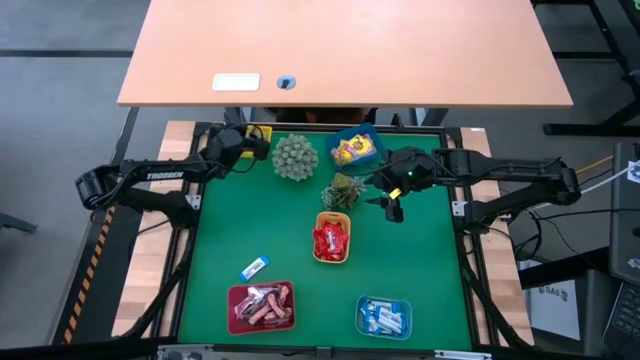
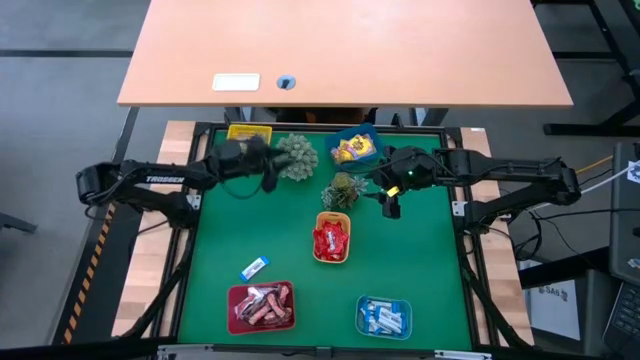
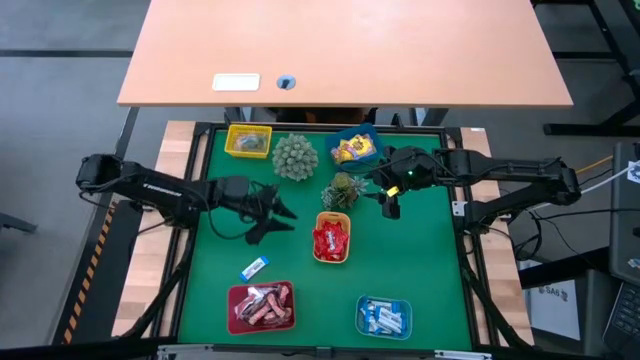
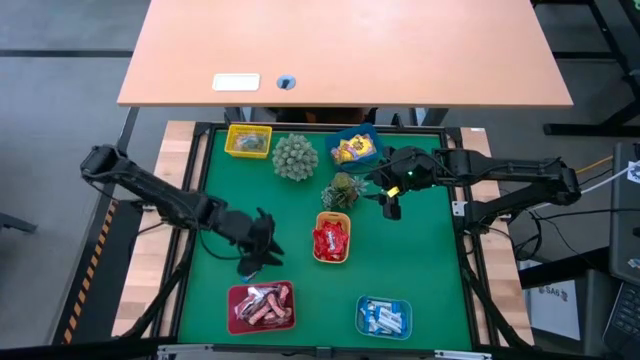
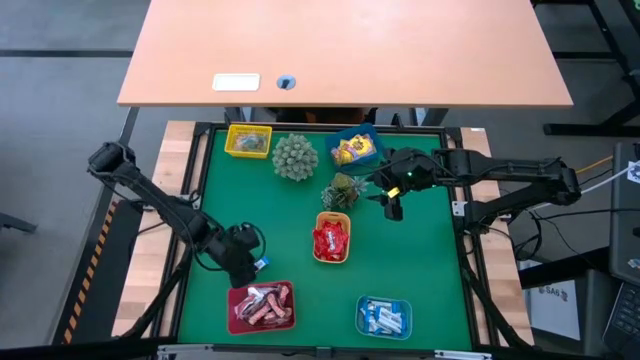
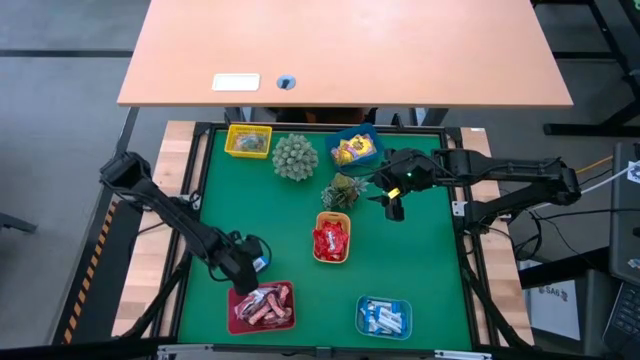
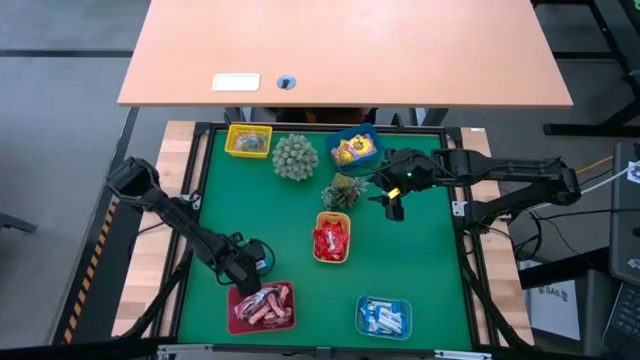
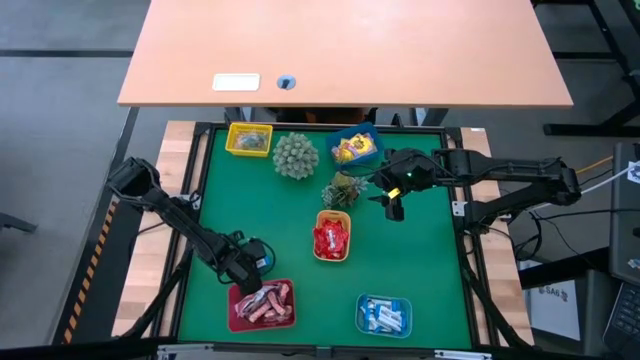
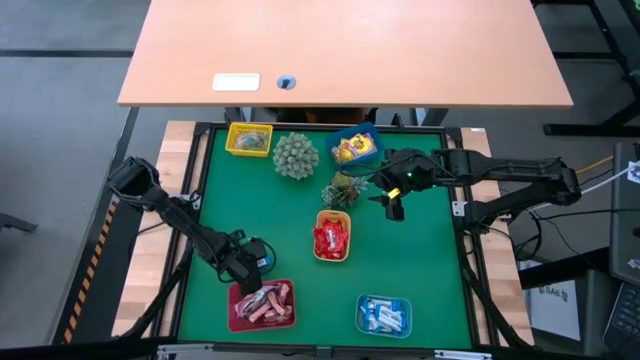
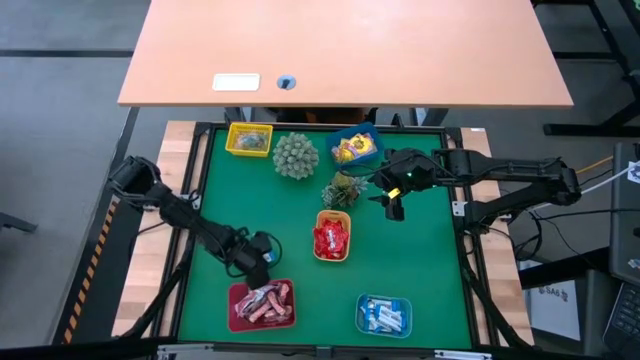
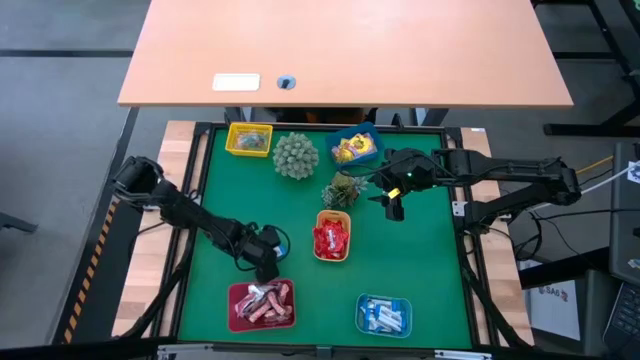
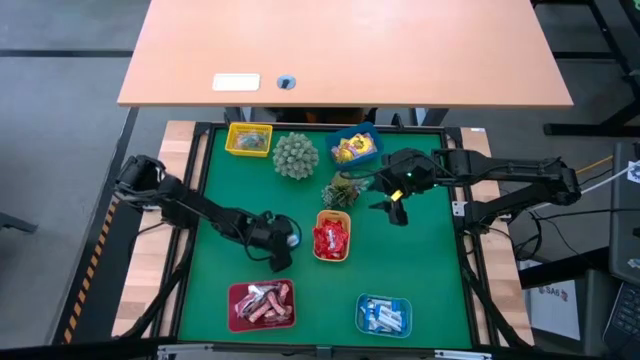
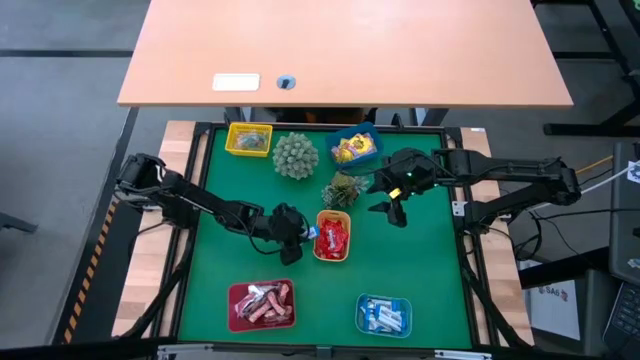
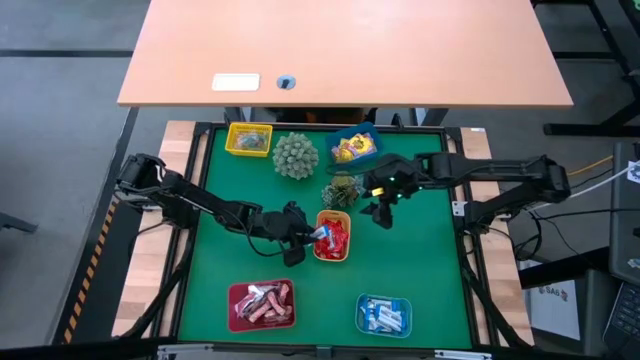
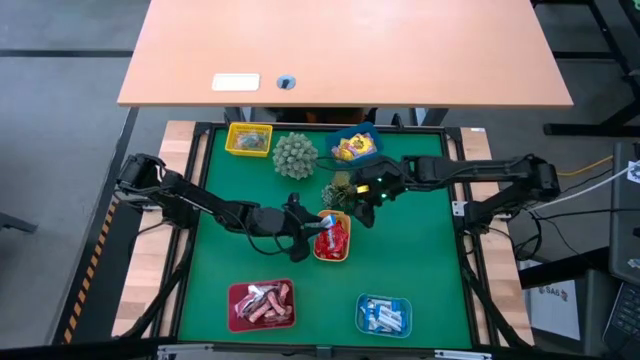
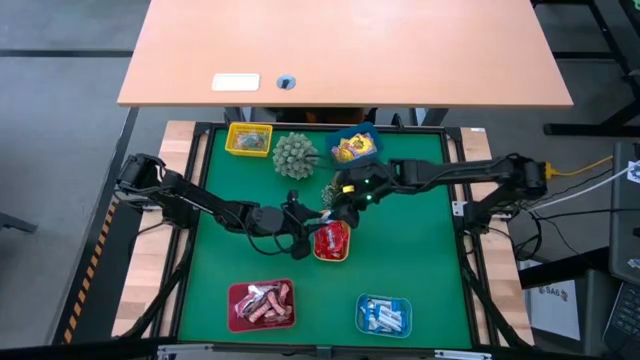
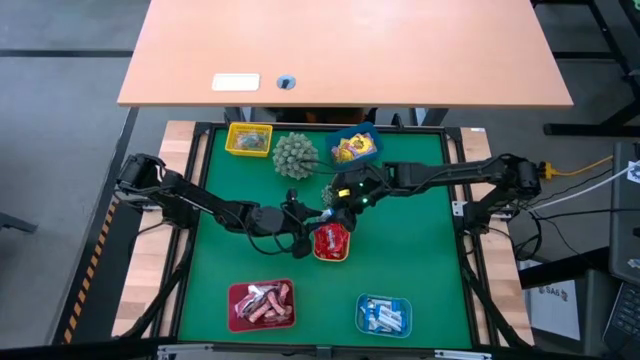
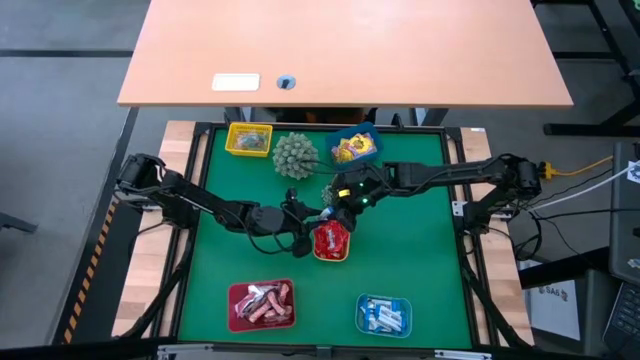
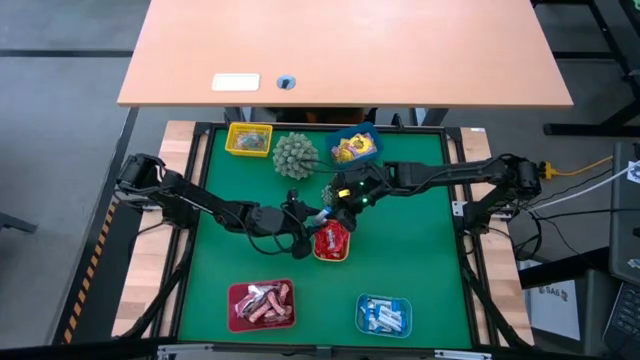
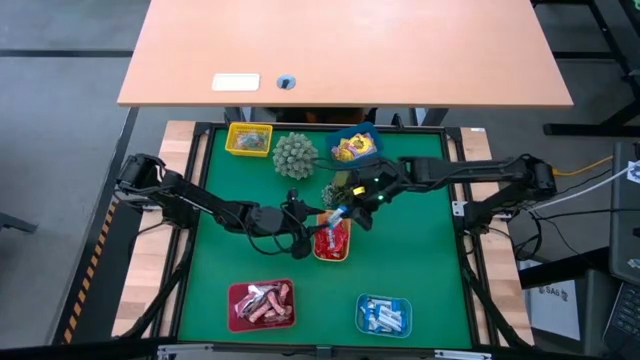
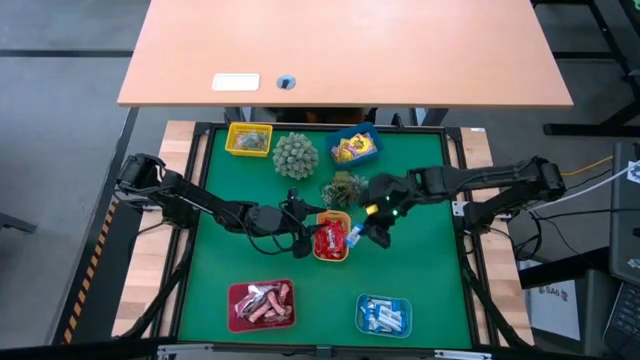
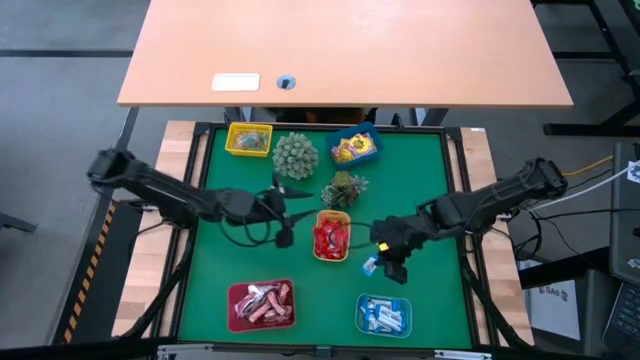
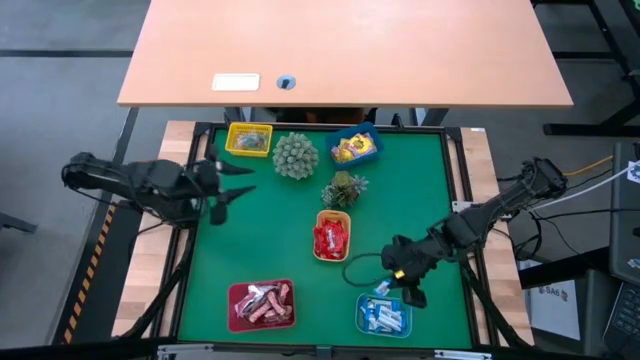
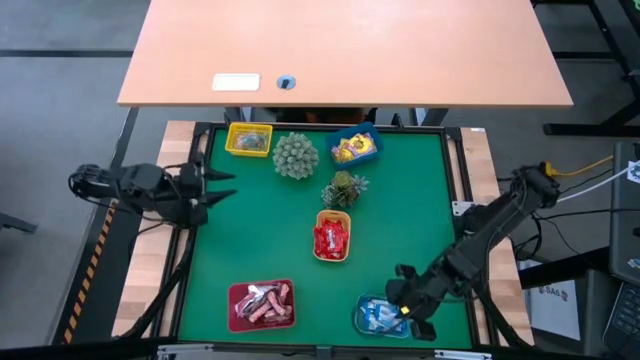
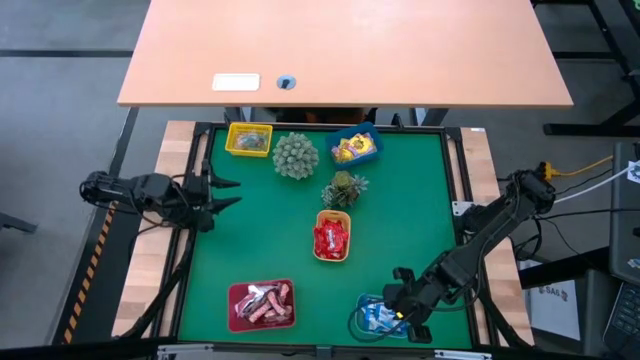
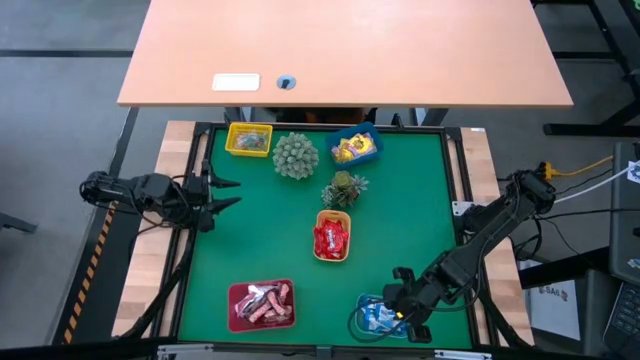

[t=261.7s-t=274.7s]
Task: Sort candy
Put the blue chocolate bar into the light blue bin

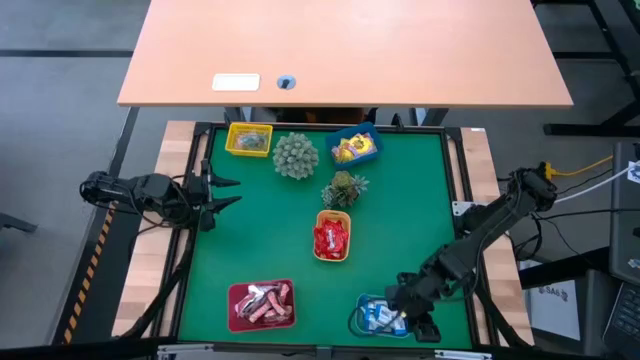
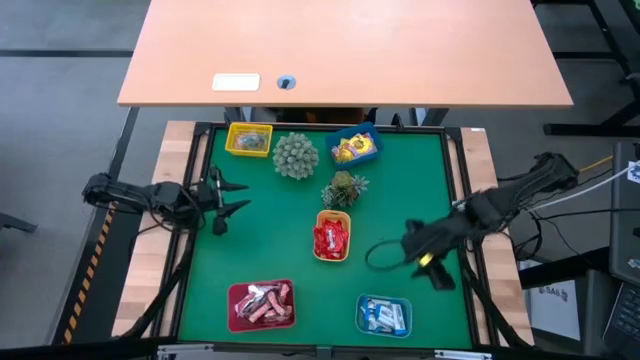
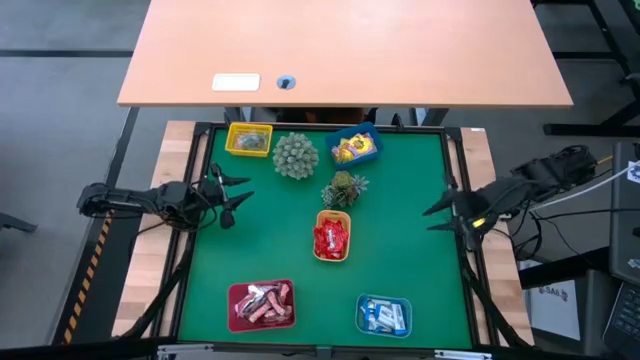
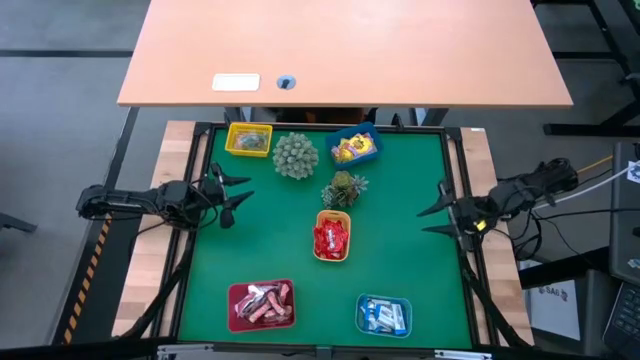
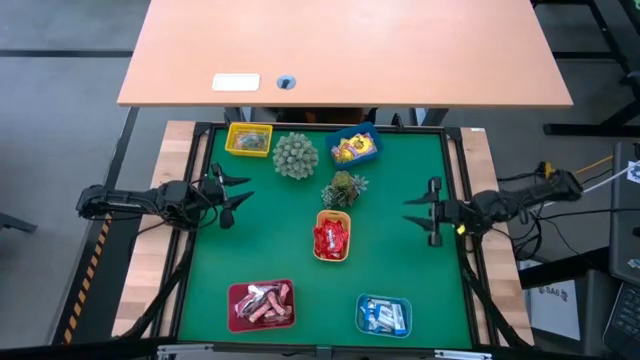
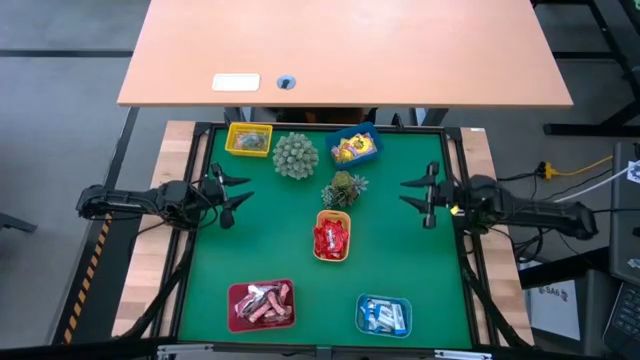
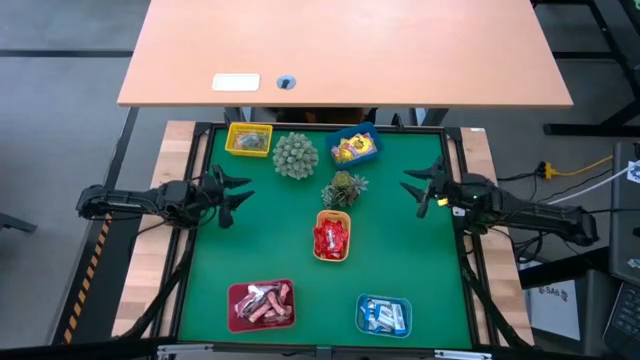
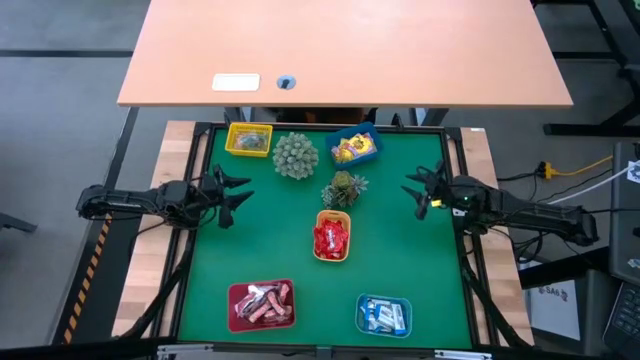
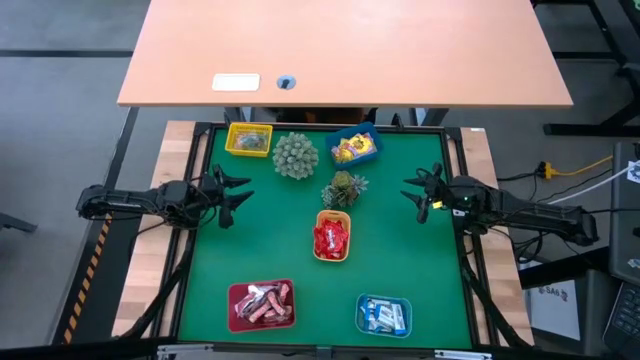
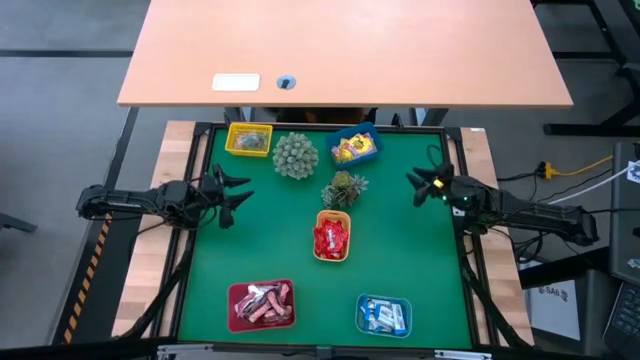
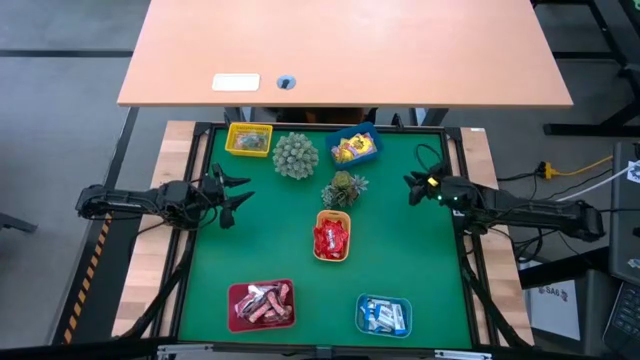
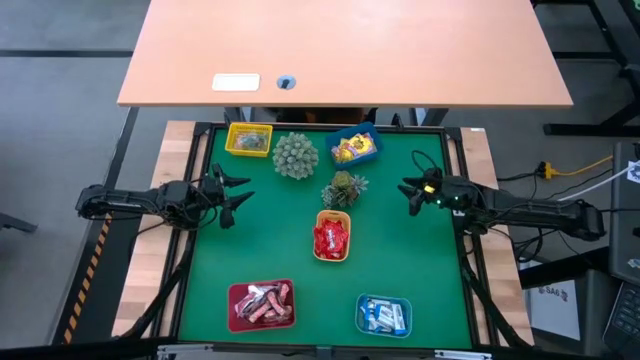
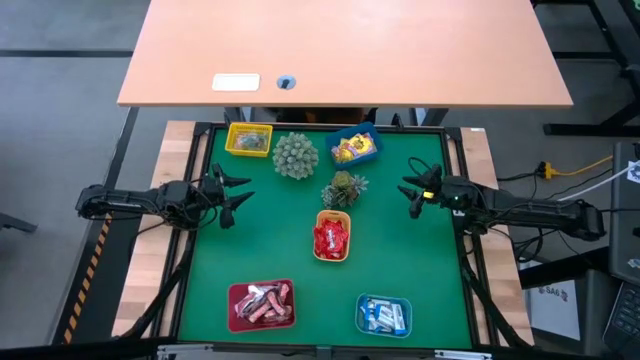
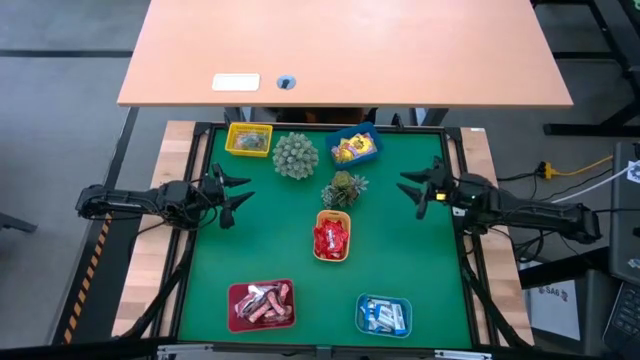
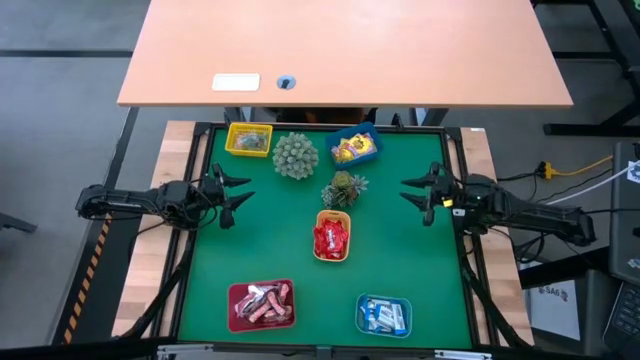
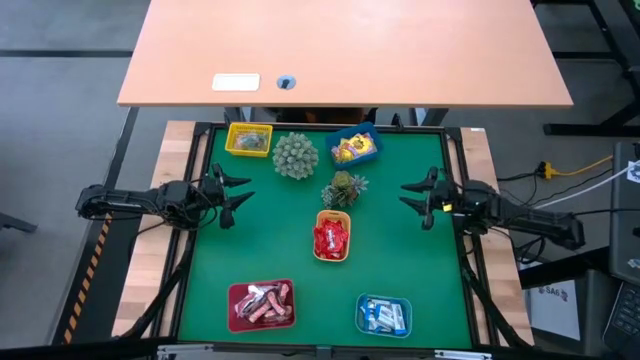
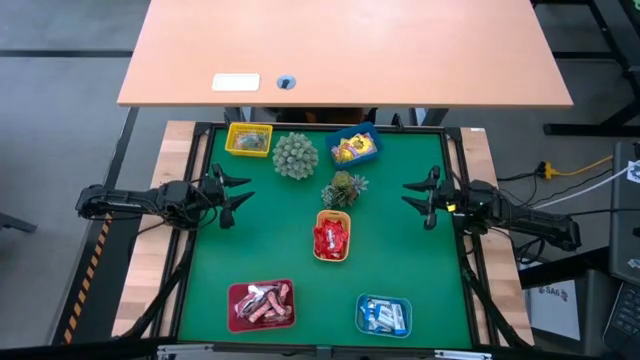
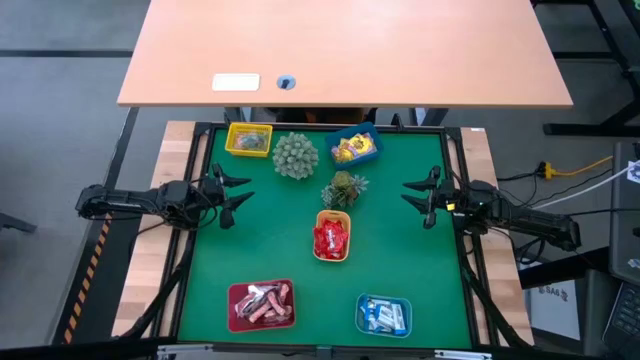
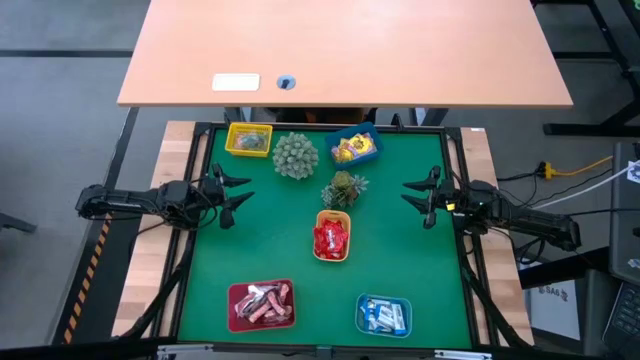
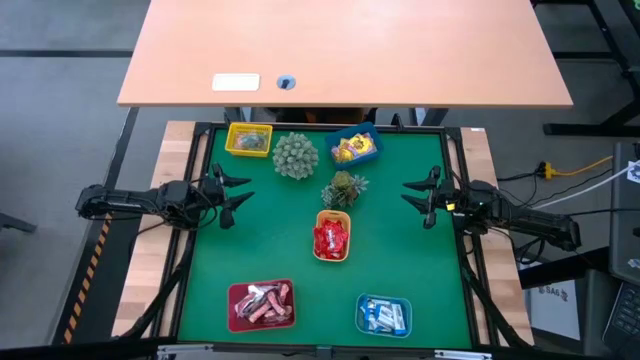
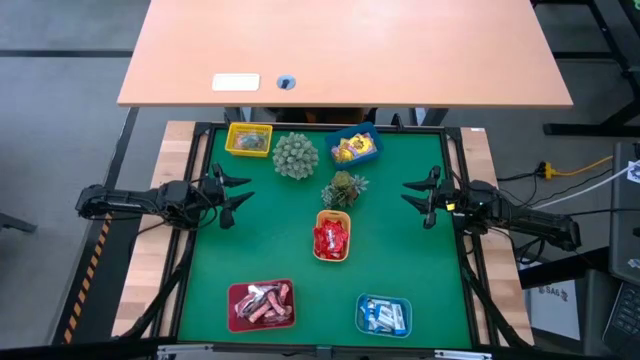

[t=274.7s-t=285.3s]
Return to Home Position
